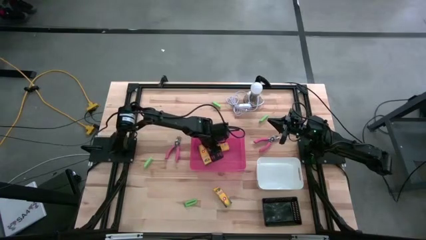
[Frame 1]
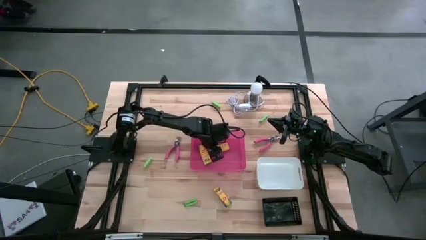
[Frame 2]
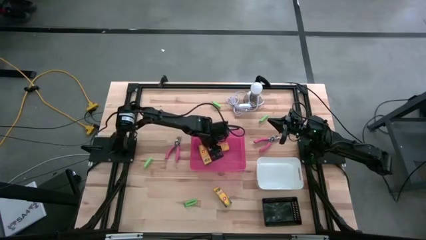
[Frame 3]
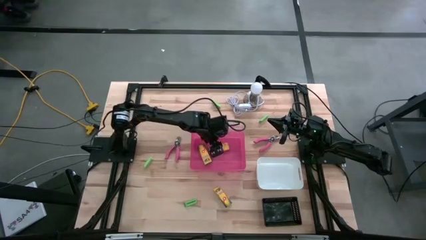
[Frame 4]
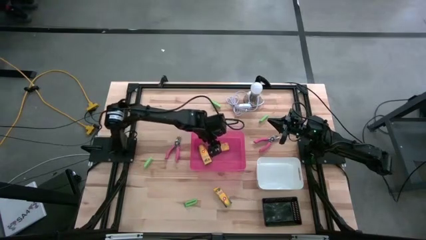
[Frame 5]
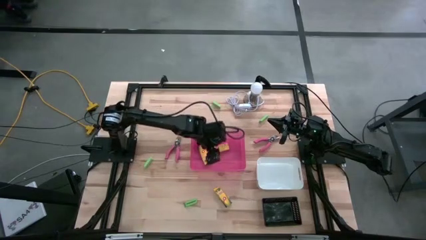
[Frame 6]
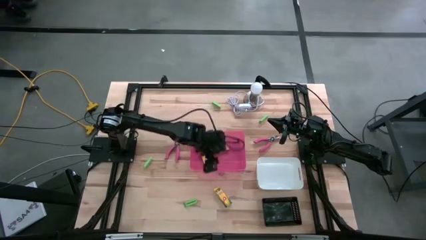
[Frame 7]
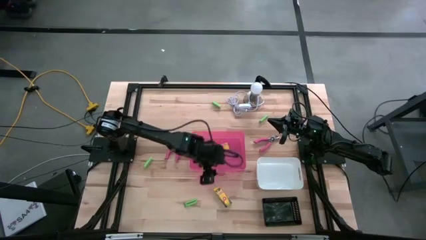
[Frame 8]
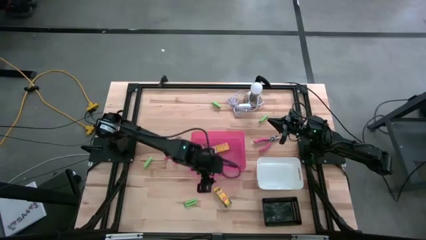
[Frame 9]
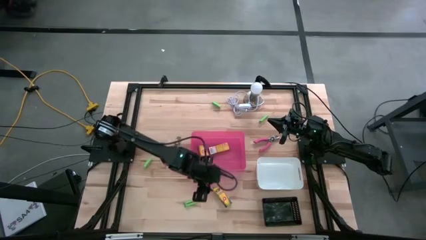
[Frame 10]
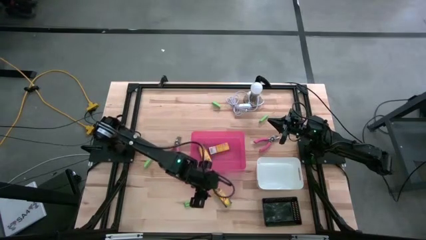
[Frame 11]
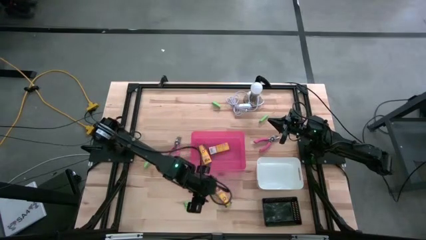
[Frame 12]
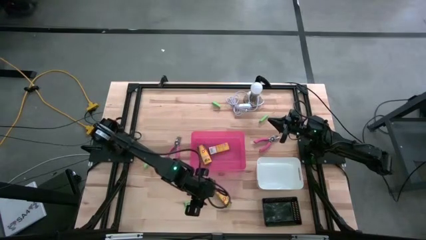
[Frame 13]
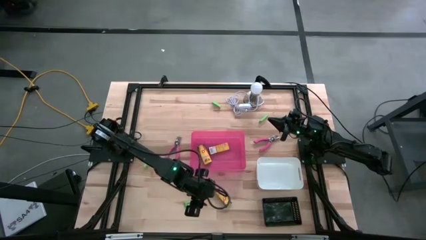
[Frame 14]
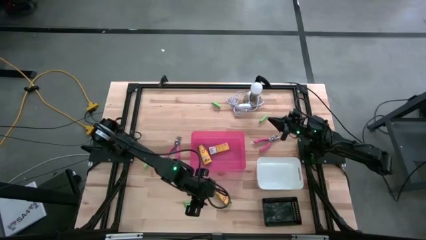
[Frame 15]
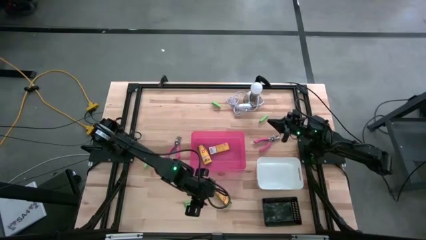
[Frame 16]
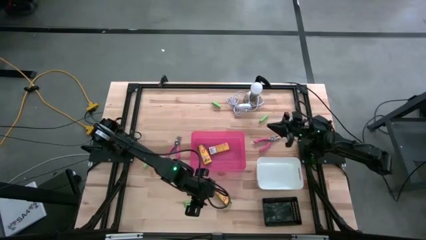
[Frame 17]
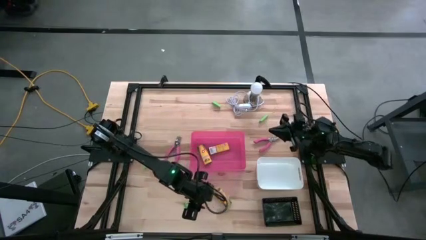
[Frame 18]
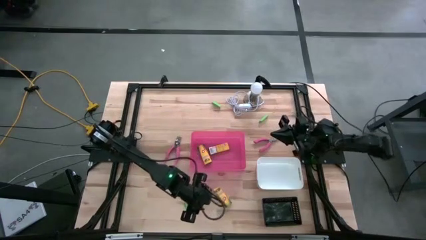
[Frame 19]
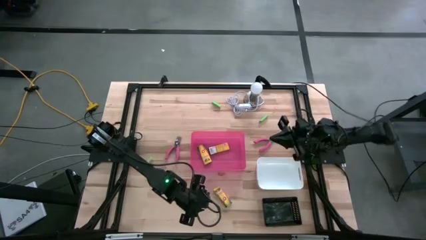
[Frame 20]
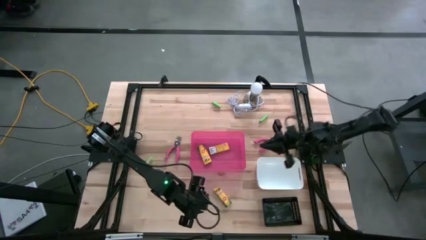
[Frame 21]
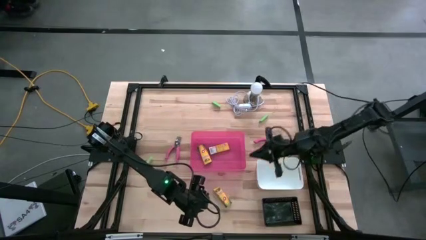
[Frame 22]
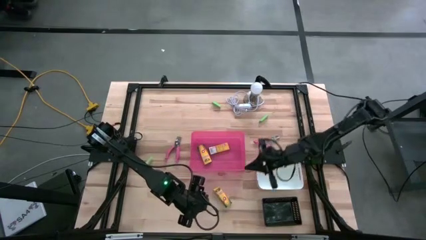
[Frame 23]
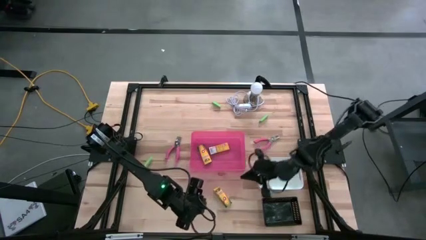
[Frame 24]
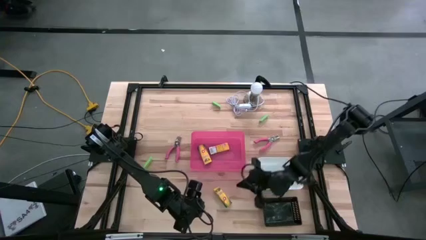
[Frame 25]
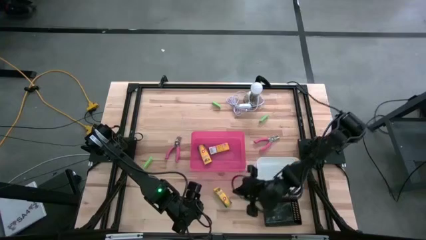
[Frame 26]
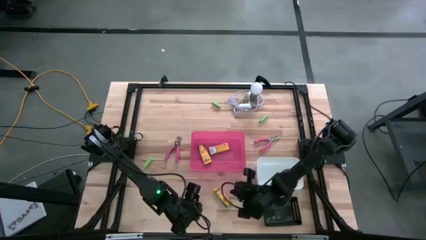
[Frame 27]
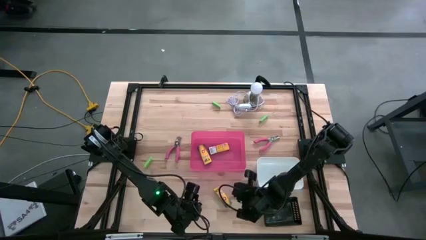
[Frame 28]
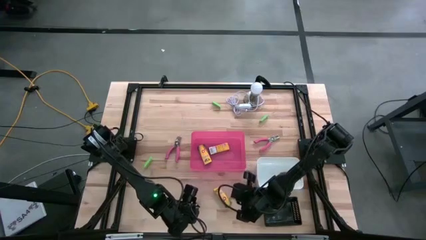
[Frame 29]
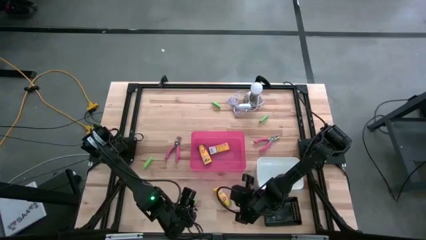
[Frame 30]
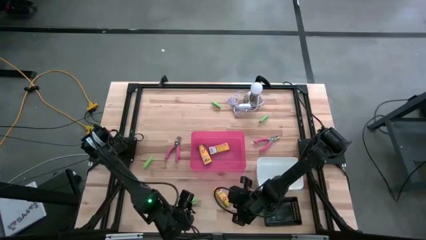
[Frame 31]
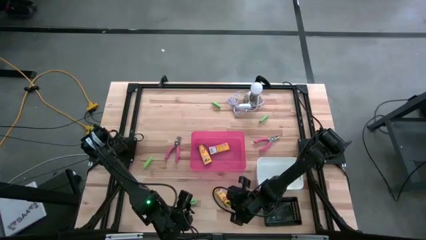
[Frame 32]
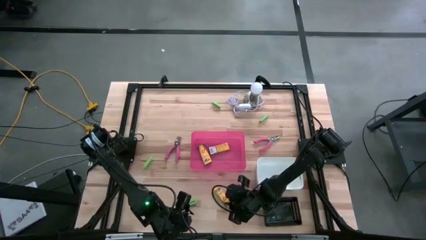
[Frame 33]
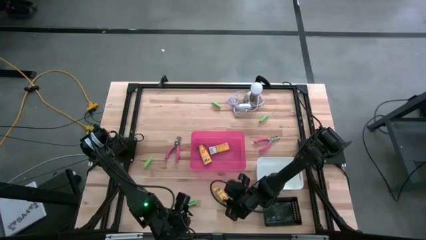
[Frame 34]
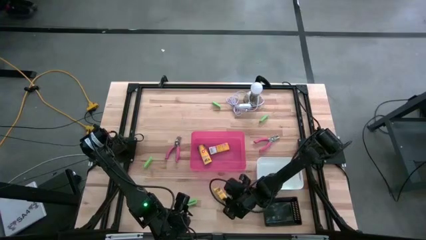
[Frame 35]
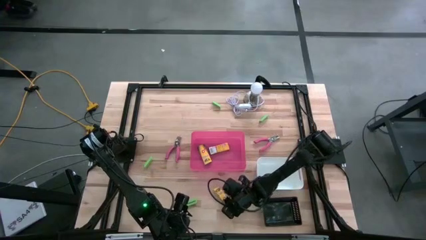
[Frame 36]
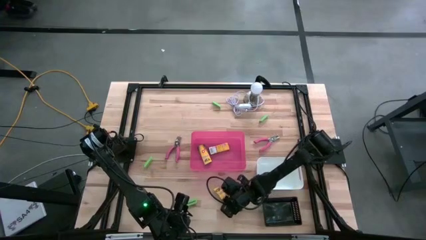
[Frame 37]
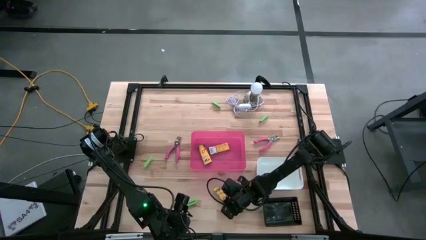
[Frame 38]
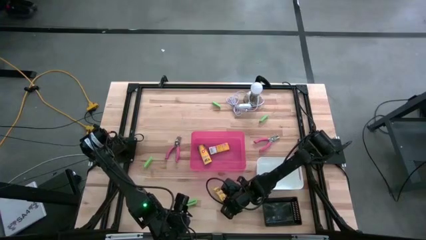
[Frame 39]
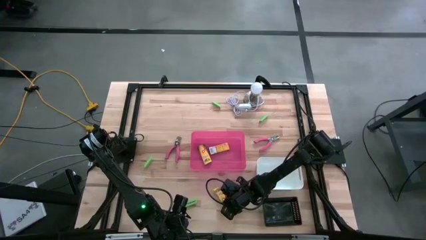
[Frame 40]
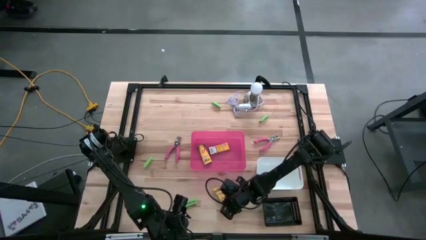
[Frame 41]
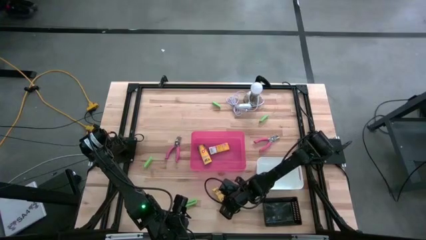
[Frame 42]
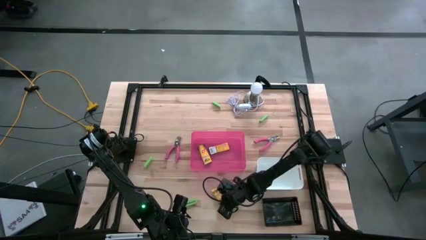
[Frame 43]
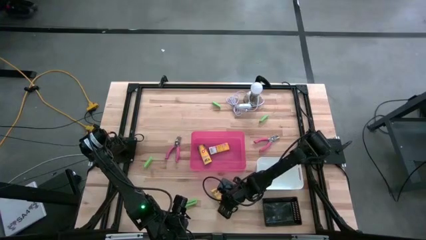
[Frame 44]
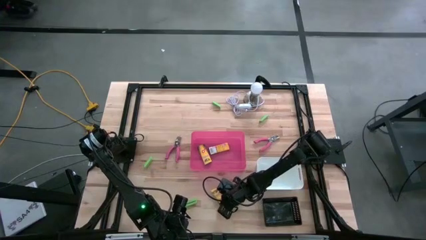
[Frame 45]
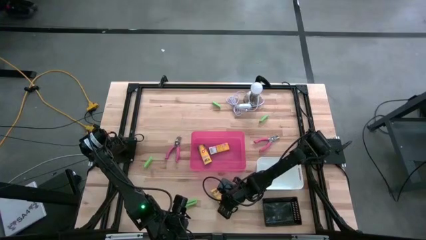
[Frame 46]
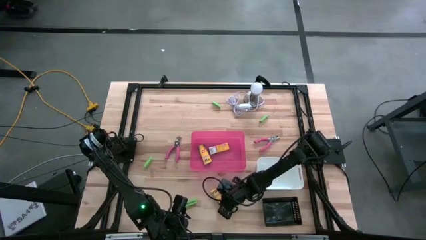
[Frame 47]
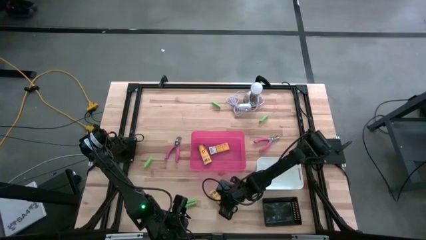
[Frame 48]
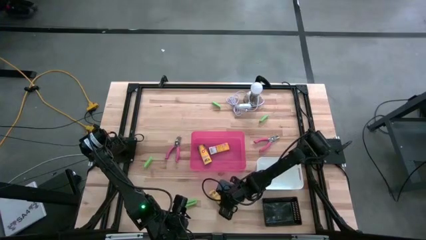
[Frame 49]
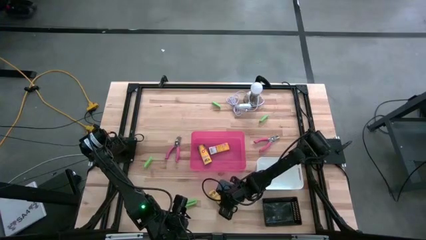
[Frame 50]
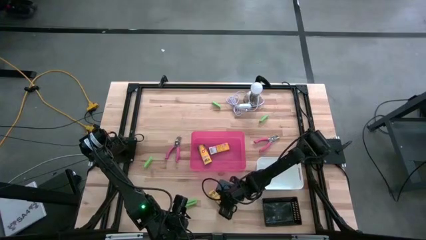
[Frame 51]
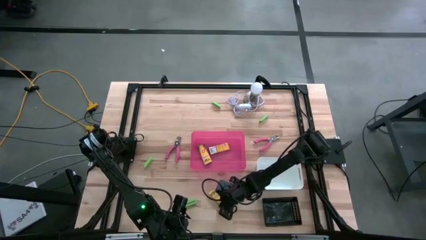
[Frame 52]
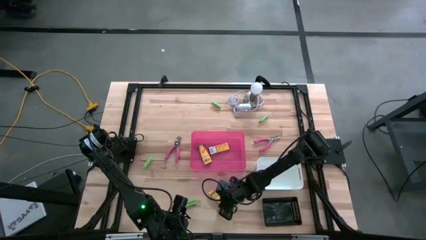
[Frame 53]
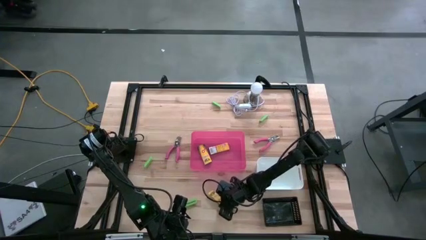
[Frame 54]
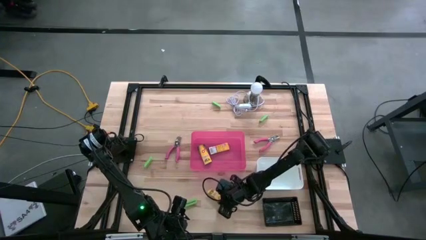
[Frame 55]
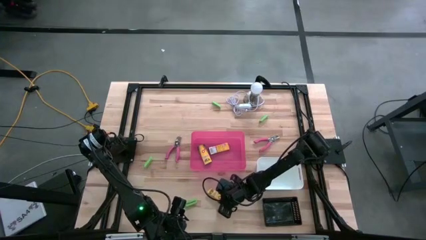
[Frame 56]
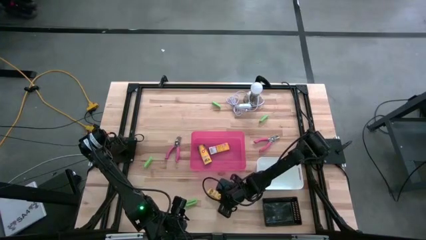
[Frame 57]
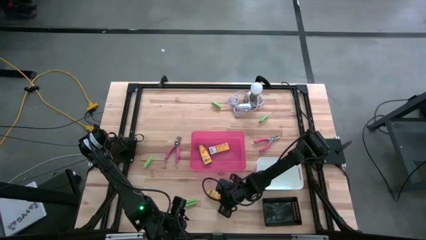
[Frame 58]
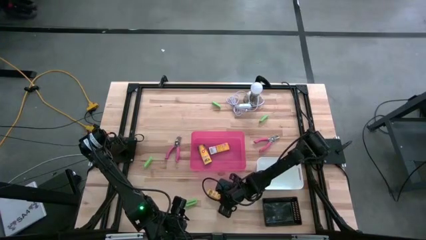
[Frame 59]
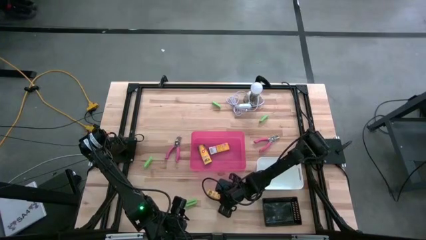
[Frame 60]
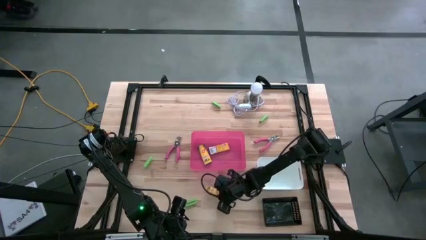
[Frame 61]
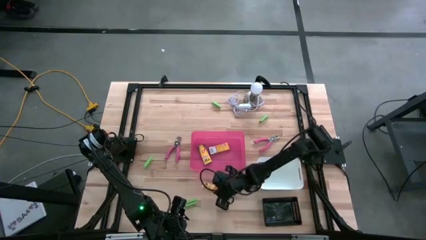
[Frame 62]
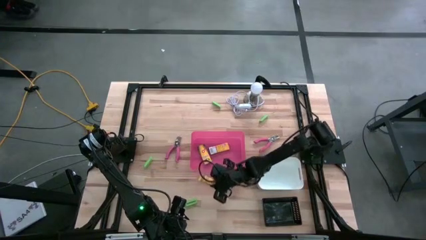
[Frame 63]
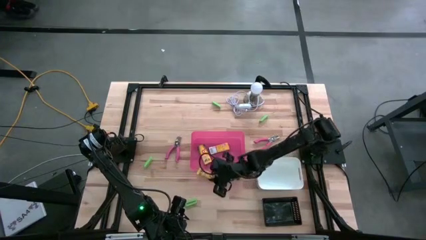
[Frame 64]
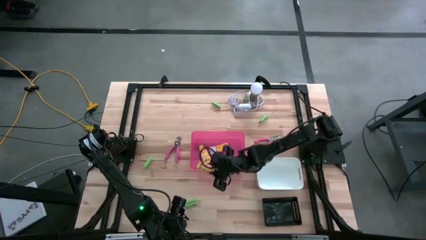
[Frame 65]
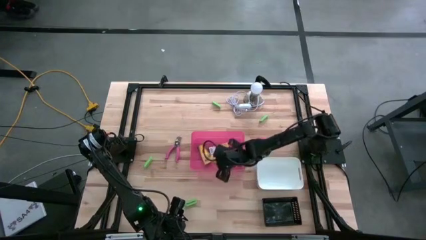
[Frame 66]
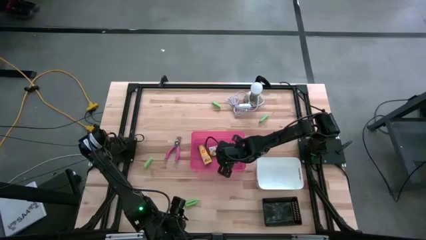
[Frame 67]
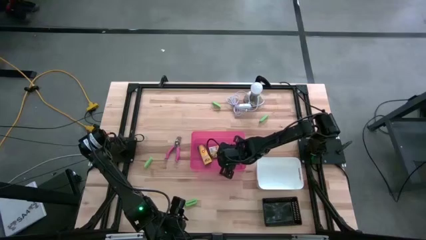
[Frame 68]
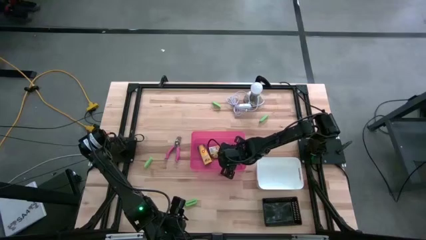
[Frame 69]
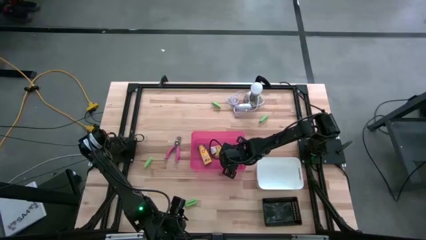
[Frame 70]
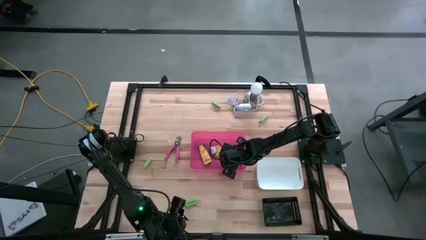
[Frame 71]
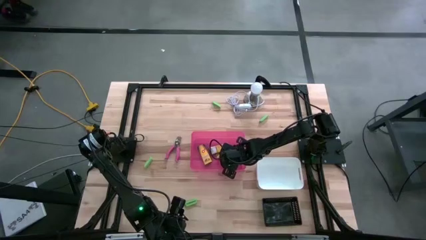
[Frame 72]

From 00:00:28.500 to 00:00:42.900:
Task: Pick & Place School Supplies
Put the yellow crayon box into the pink bin
